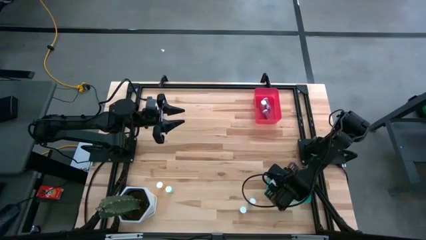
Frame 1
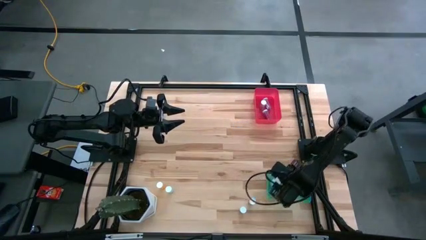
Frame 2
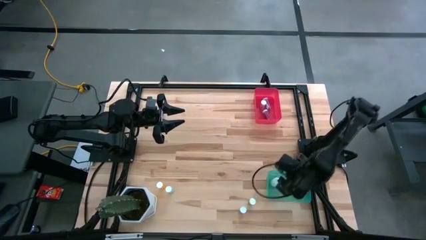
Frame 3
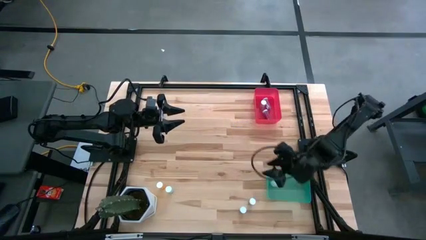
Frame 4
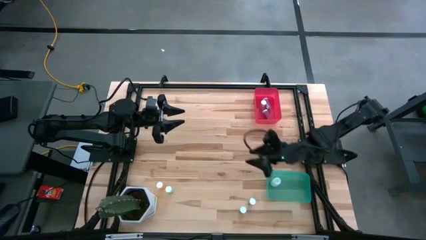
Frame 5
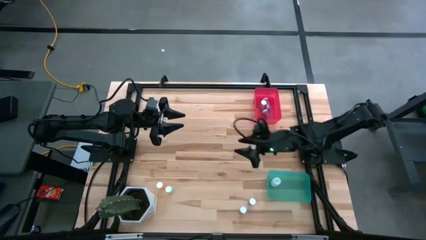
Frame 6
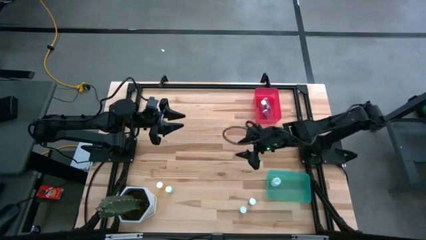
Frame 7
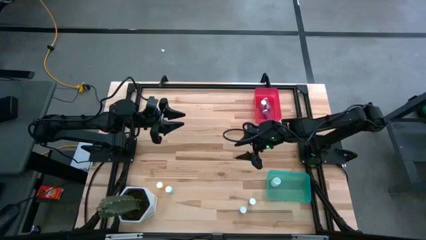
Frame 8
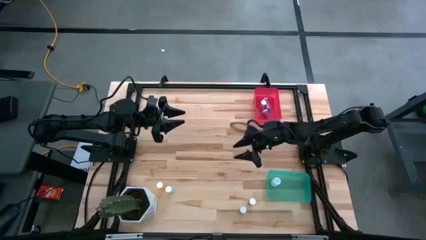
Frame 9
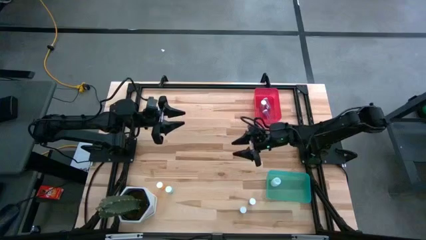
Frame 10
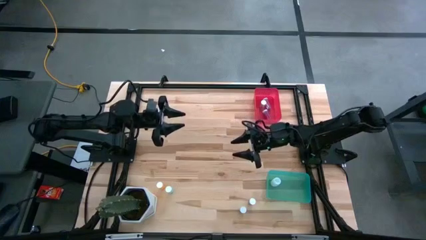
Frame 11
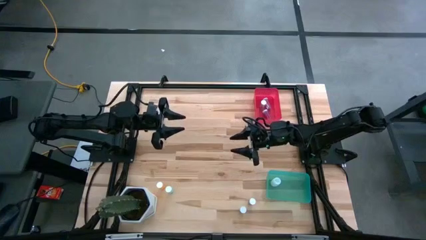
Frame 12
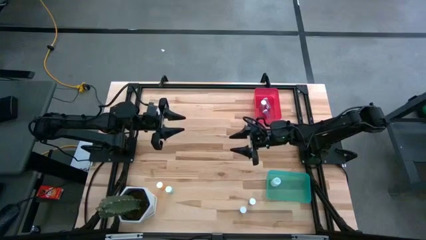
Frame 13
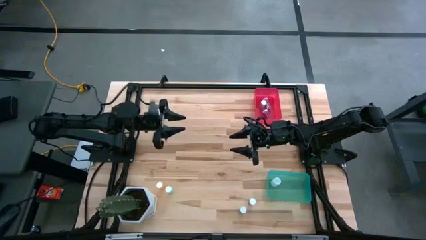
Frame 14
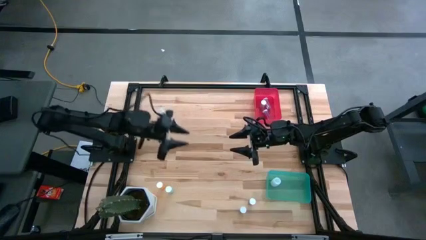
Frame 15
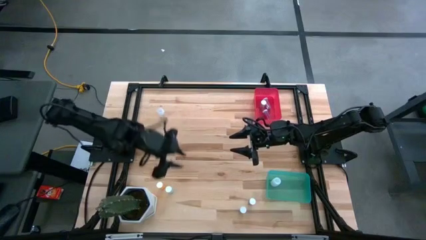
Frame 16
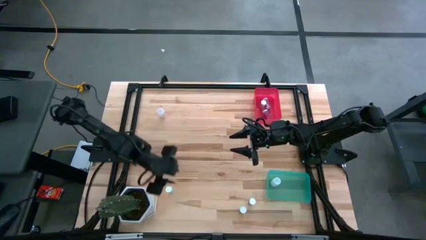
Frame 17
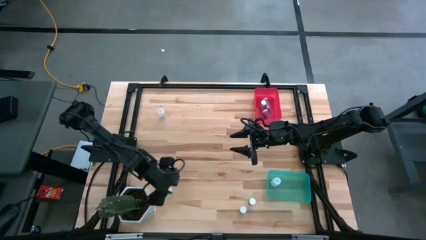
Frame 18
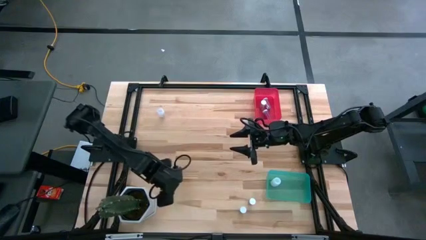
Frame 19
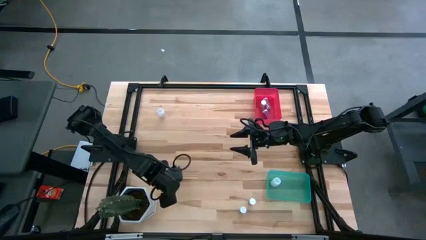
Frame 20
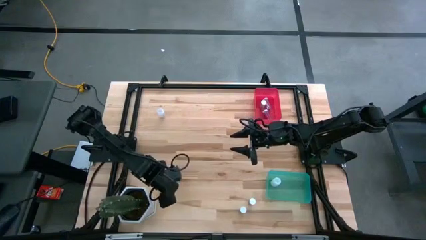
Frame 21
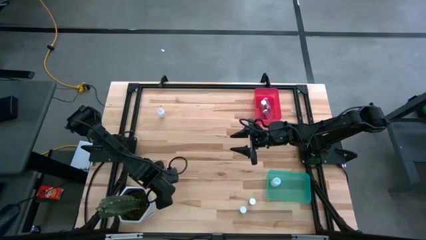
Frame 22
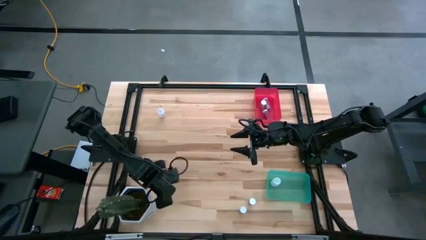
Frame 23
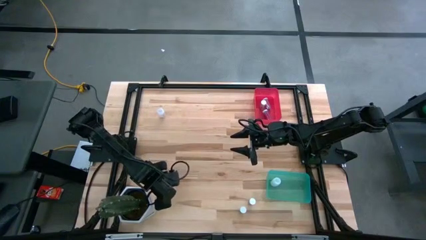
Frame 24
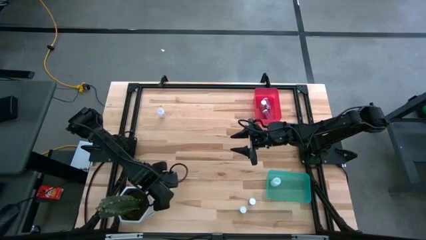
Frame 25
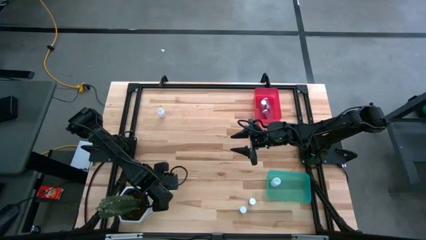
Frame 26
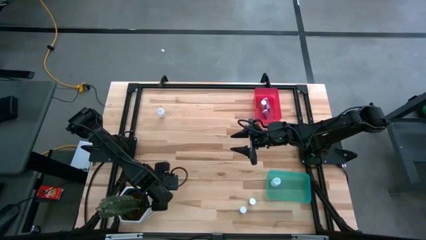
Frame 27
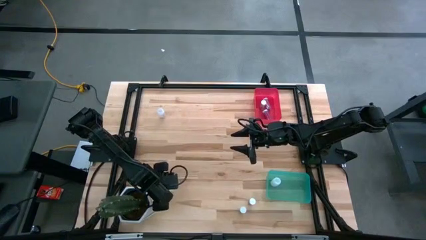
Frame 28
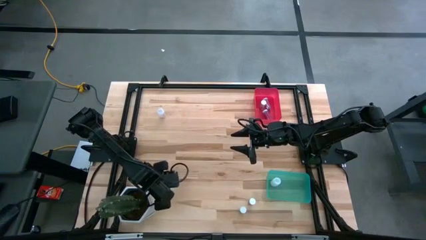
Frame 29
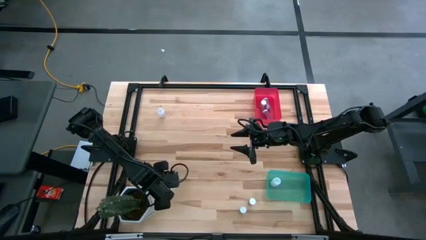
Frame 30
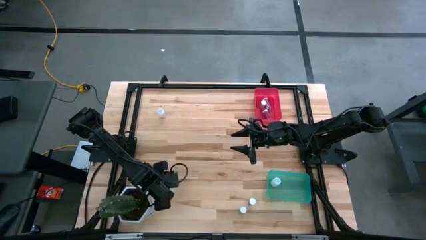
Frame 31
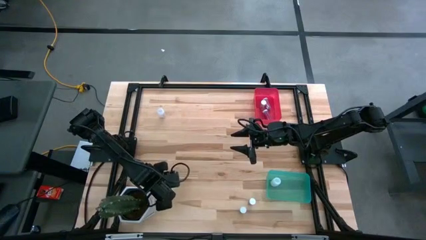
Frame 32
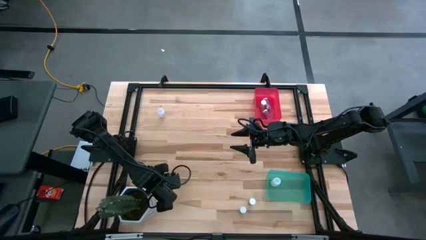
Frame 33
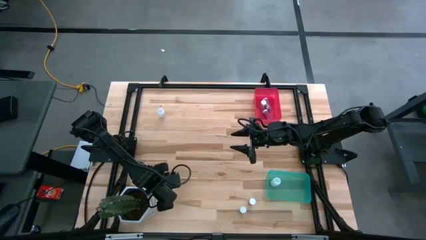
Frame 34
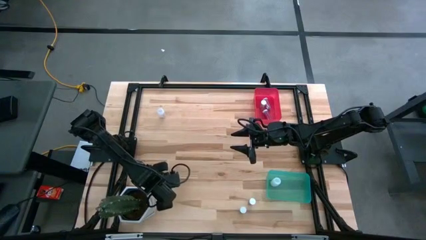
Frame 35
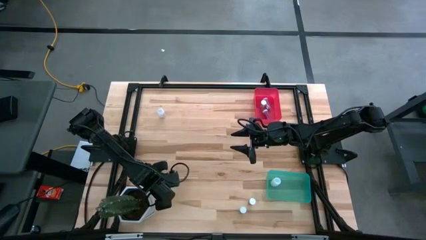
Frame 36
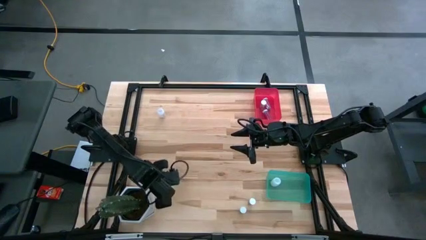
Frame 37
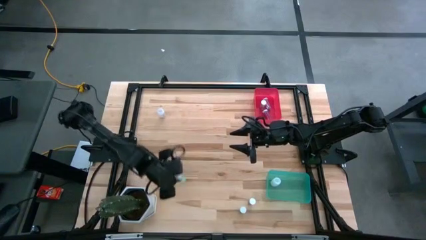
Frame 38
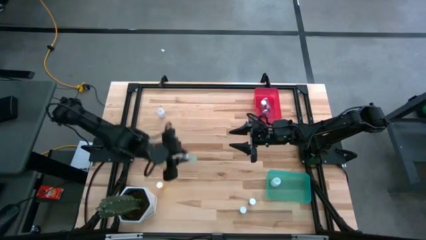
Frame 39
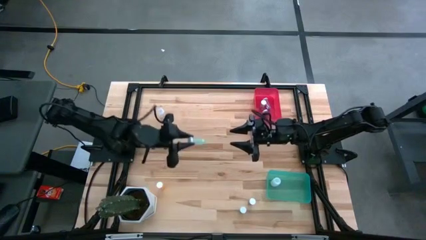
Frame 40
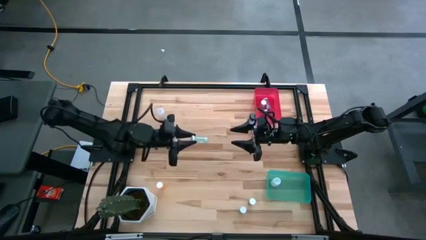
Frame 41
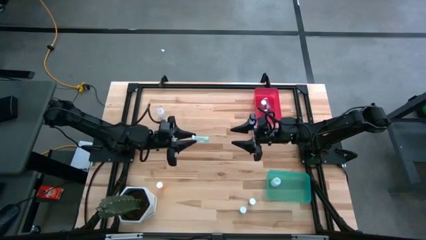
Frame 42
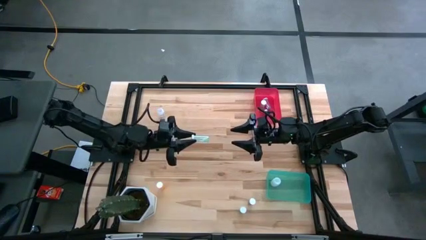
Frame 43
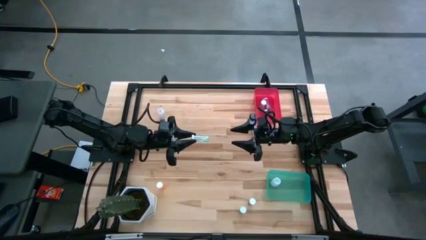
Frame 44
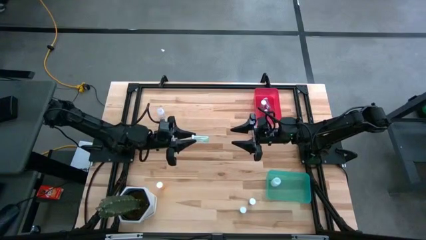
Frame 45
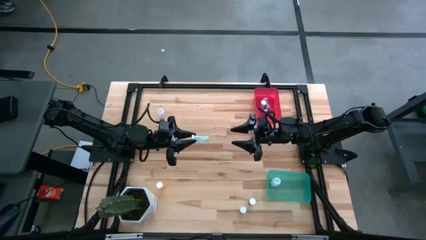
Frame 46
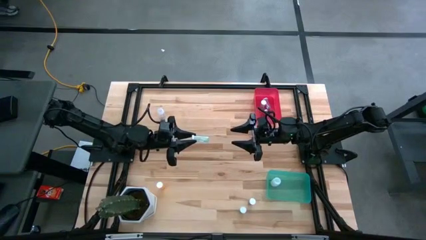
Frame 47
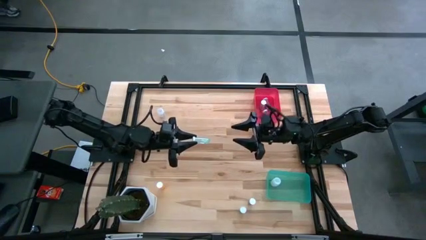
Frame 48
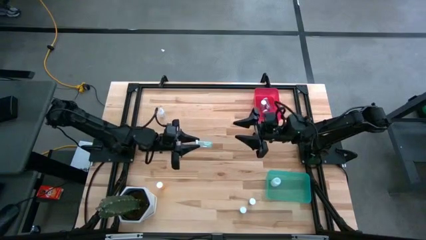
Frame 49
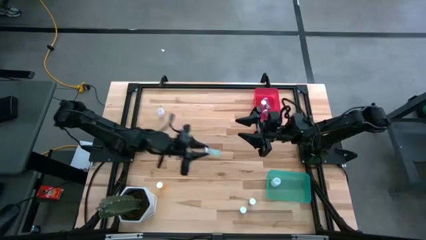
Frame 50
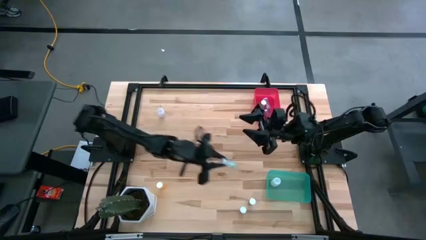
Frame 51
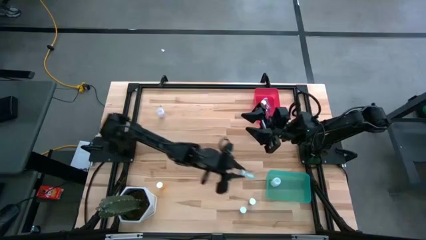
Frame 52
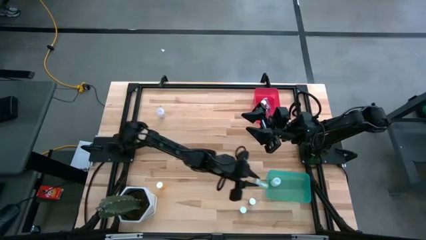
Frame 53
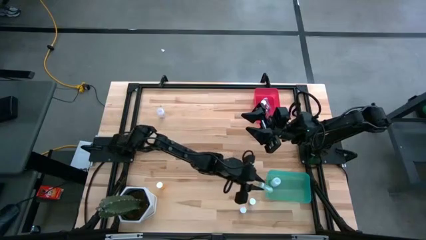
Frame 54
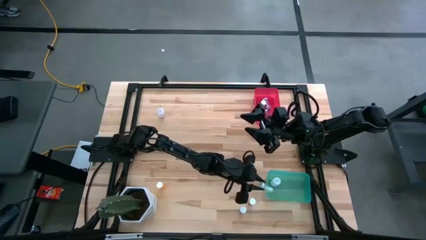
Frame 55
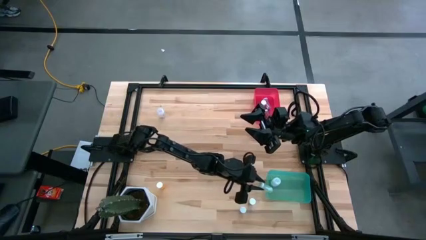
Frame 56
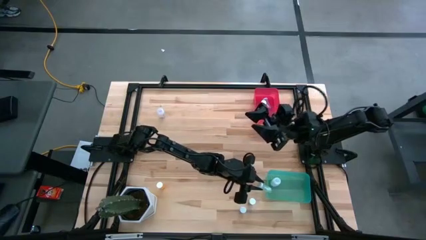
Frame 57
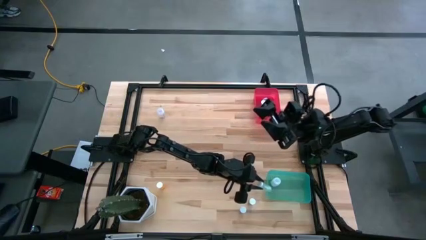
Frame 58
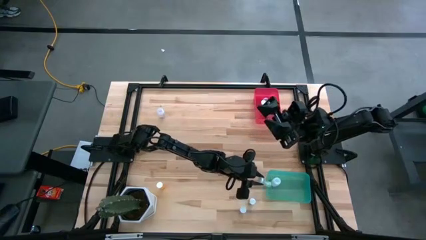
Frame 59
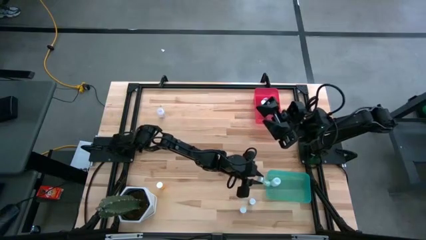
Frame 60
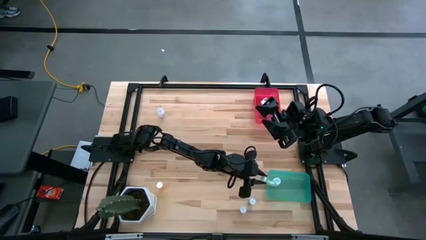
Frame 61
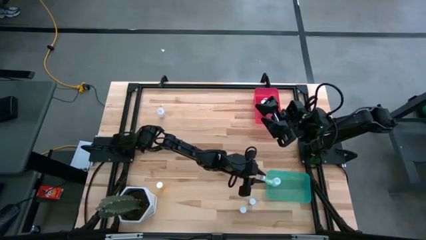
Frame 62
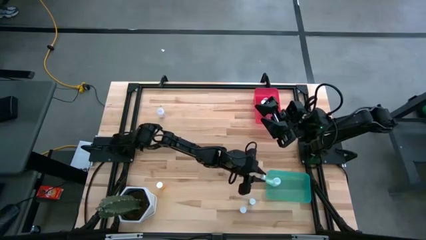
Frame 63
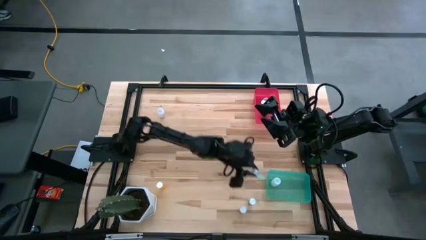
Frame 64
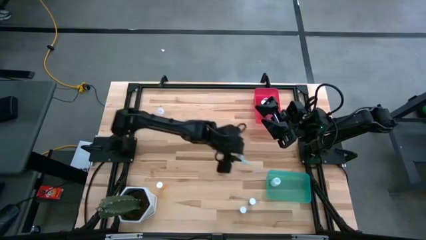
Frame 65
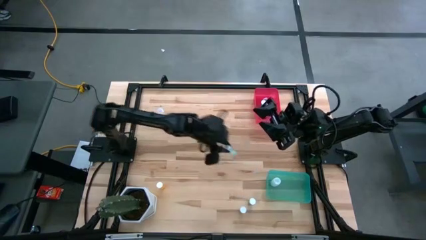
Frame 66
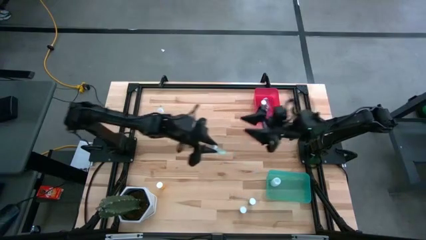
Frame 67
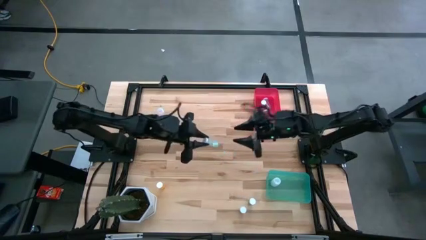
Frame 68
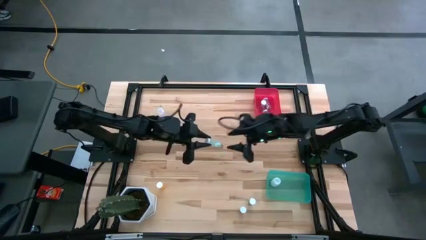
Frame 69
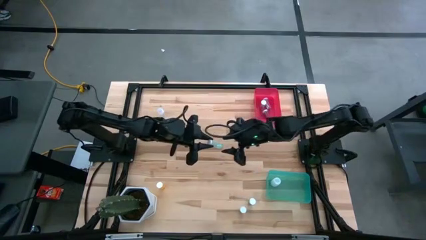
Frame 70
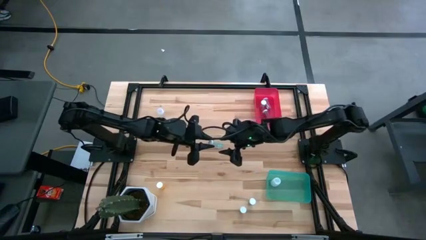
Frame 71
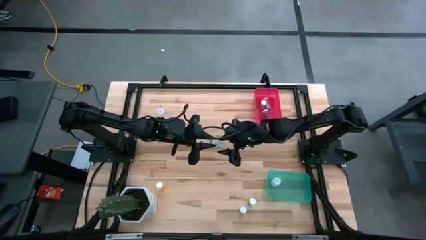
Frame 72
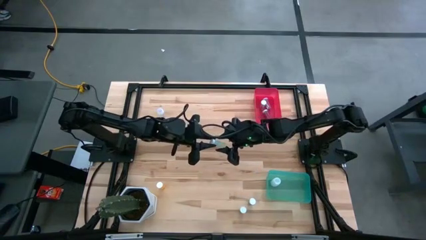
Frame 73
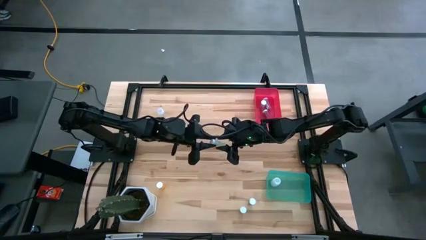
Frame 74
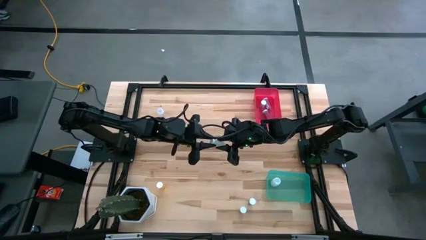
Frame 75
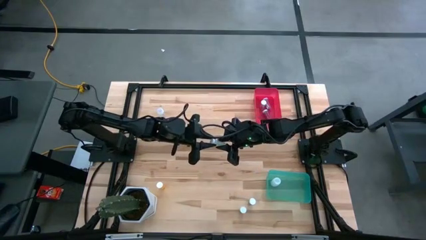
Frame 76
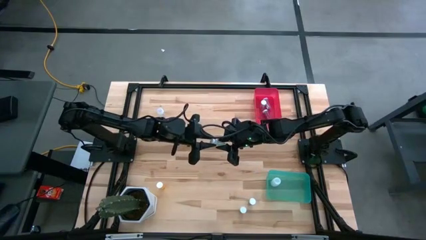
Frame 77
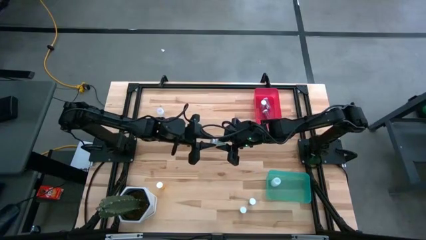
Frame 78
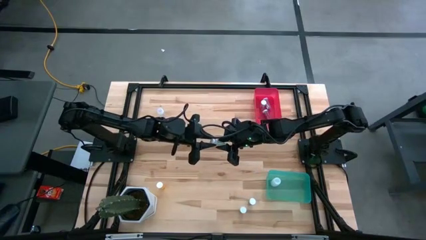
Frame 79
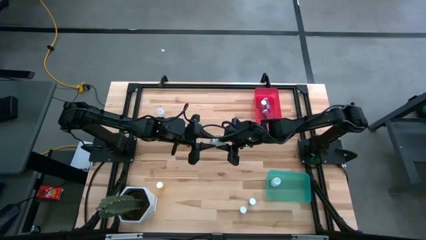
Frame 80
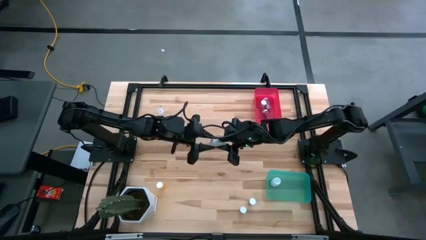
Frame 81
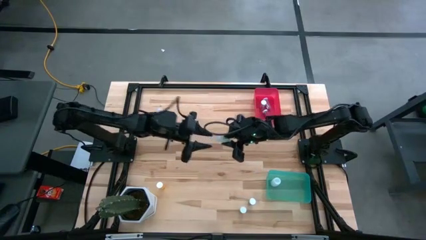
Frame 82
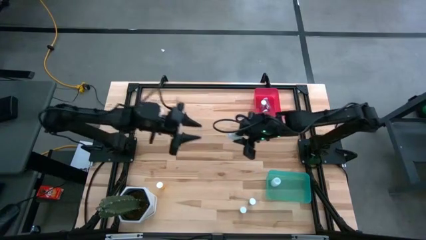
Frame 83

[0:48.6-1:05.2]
Task: Pick and place medicine bottles into bin by pill shape (circle, oval)
Put the green tablet bottle into the green bin
